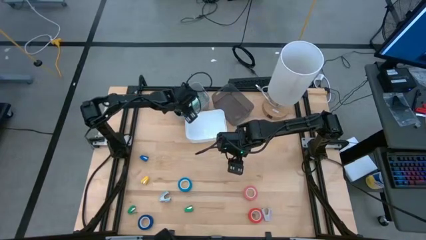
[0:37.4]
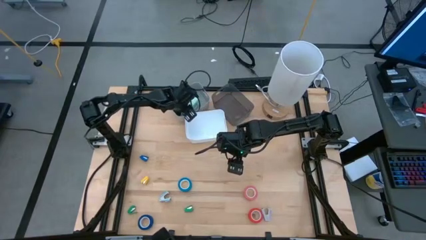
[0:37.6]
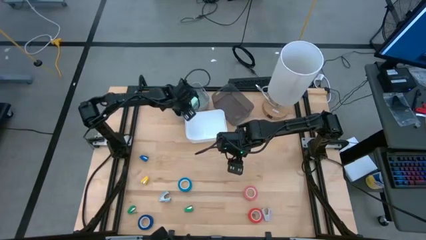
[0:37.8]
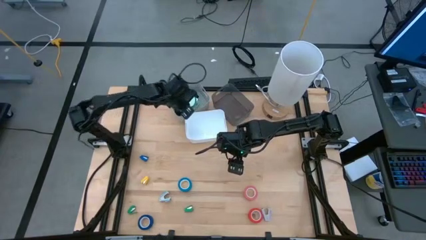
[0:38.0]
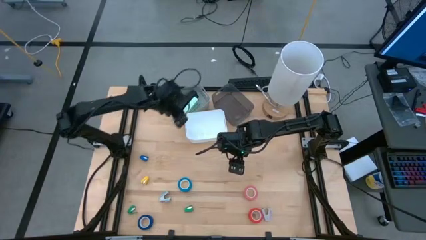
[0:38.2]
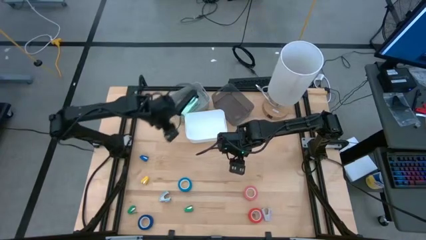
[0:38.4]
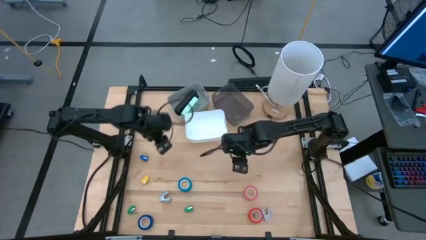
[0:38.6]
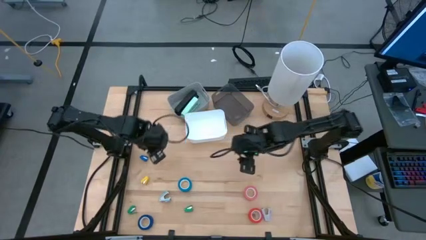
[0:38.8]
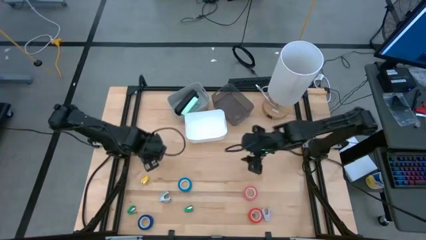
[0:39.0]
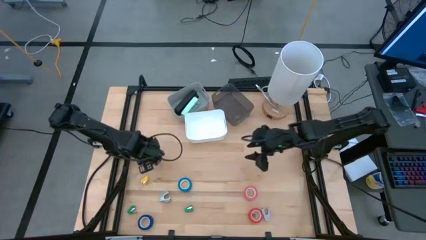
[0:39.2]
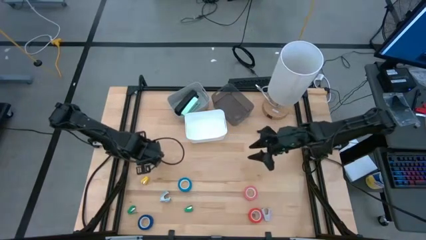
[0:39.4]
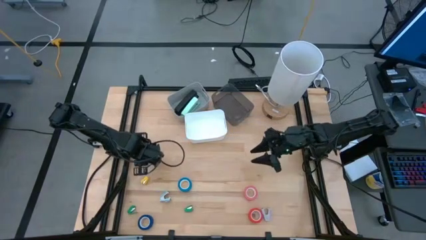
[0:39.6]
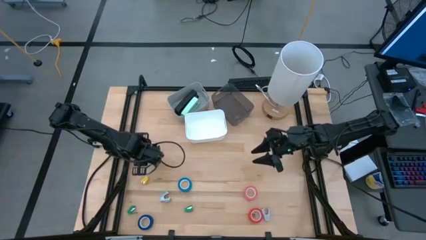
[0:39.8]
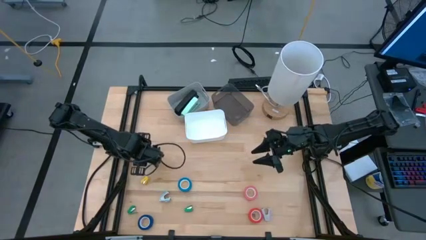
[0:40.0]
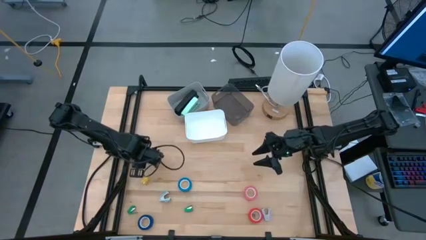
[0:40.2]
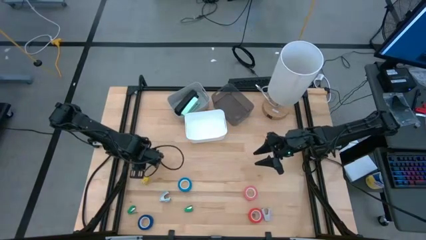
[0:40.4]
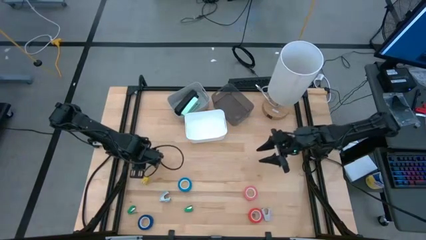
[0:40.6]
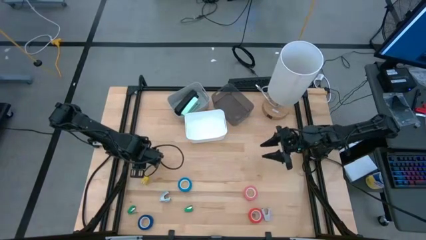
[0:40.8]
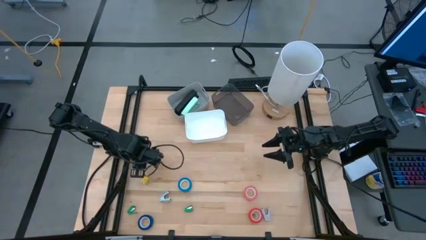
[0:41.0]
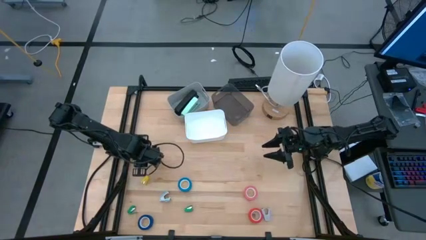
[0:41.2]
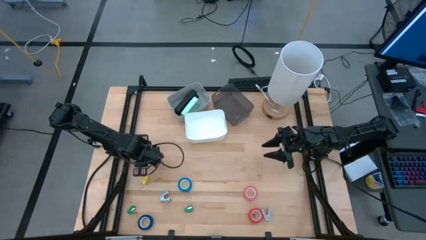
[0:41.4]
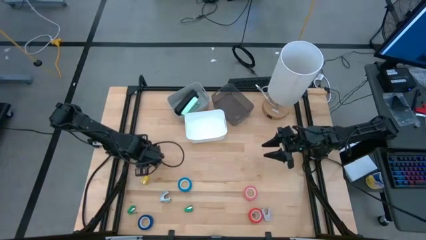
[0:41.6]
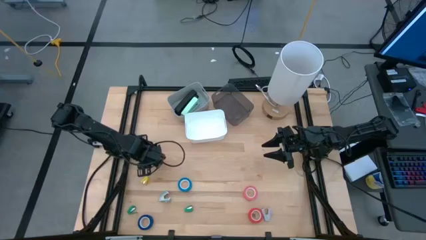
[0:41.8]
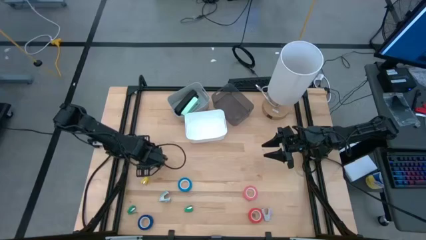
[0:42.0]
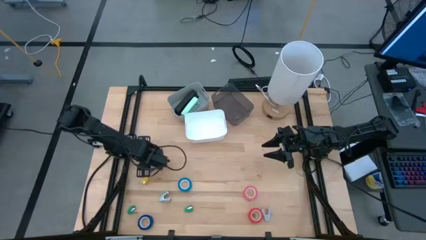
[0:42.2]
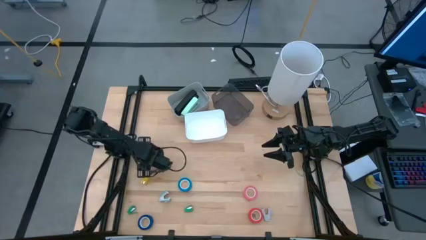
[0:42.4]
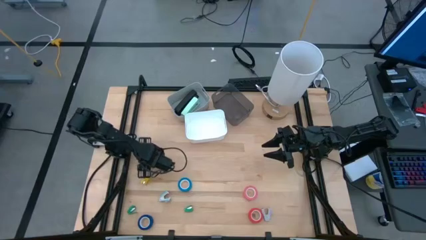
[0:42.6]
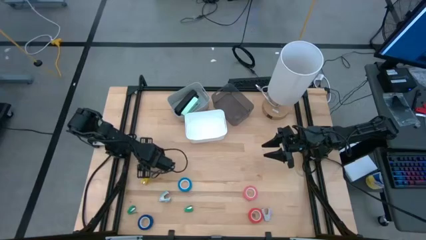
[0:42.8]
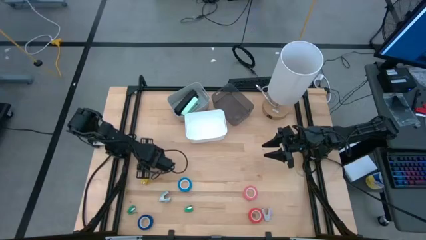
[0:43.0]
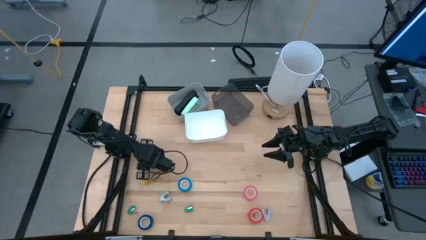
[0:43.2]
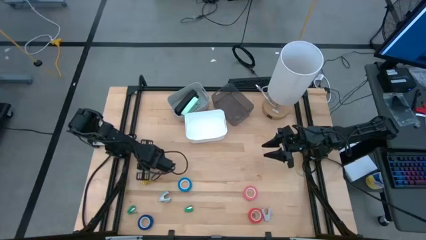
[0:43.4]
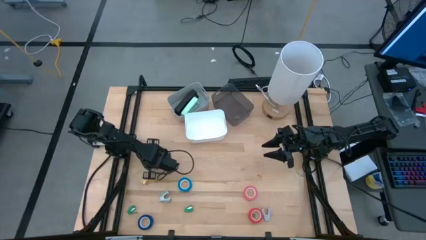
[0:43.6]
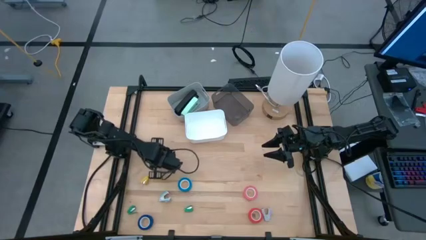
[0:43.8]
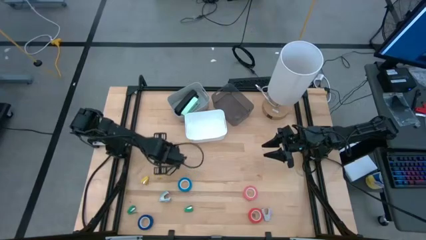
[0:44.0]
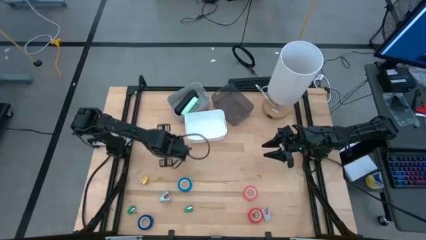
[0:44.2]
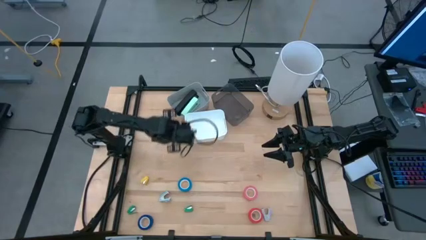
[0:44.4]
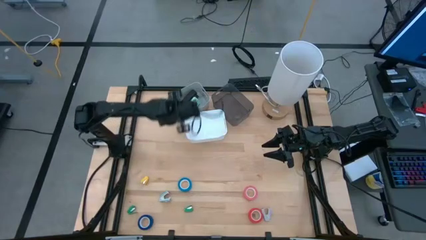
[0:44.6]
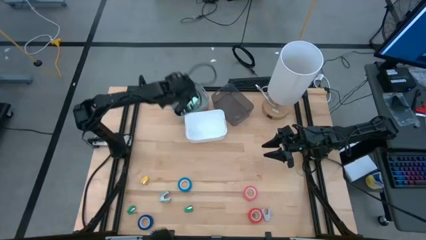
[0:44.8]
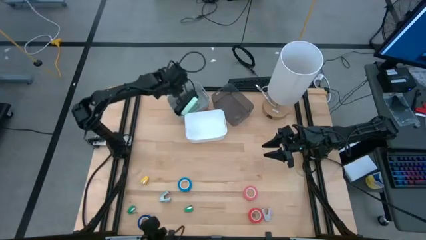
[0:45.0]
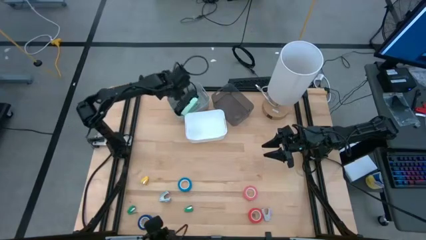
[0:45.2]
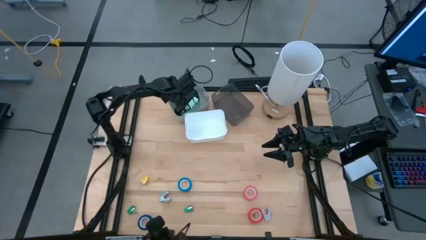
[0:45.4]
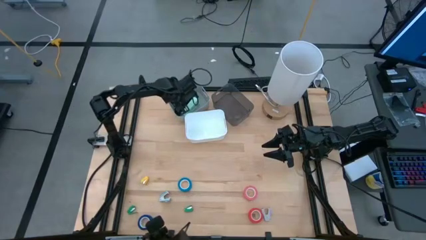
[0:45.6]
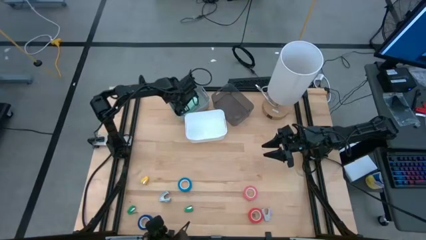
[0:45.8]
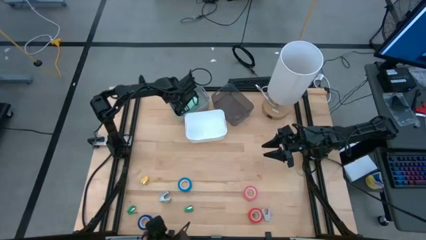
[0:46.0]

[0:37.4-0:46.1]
Task: Pick and place Stapler, Stapler remover, tape
Put the small blue stapler into the gray bin

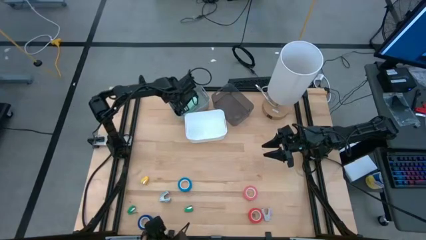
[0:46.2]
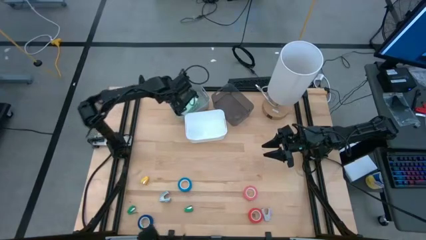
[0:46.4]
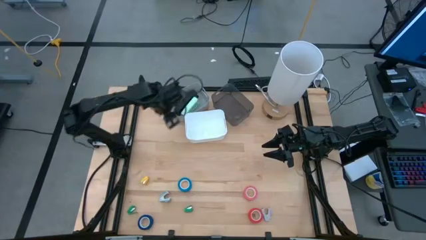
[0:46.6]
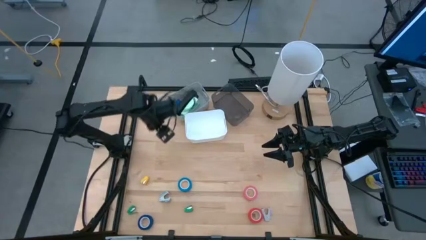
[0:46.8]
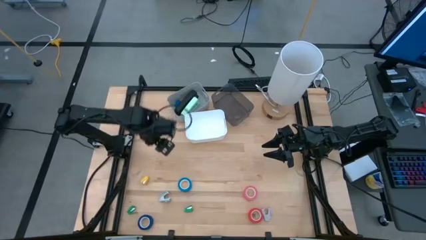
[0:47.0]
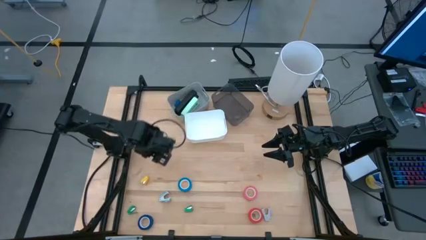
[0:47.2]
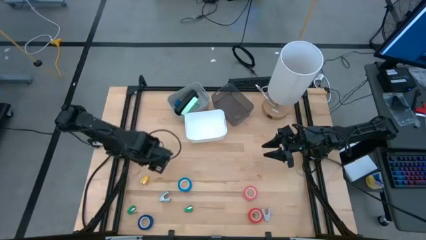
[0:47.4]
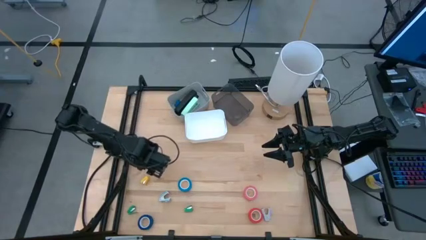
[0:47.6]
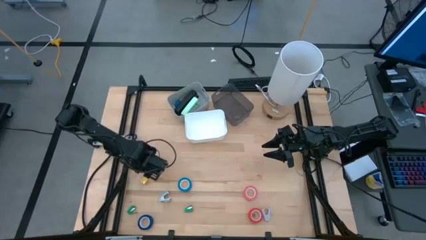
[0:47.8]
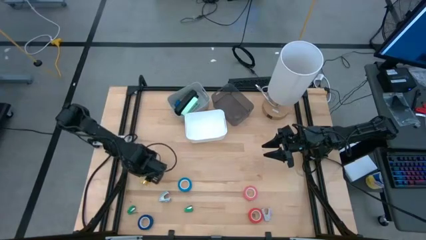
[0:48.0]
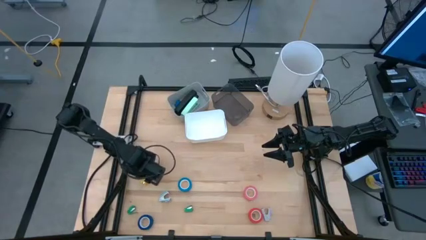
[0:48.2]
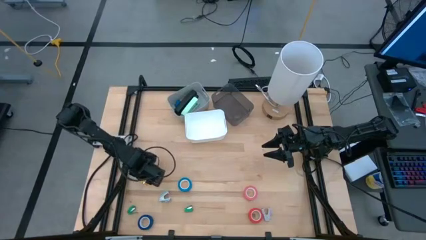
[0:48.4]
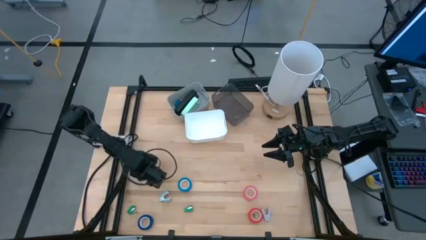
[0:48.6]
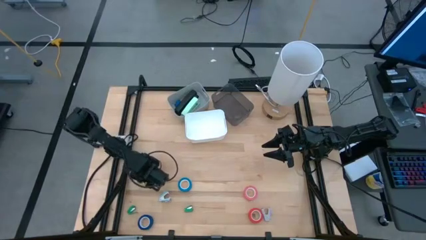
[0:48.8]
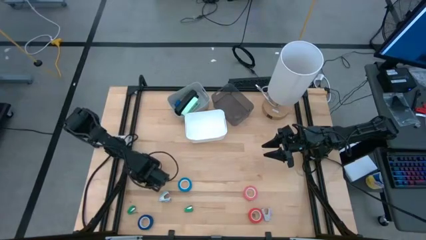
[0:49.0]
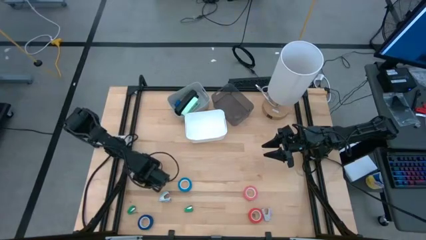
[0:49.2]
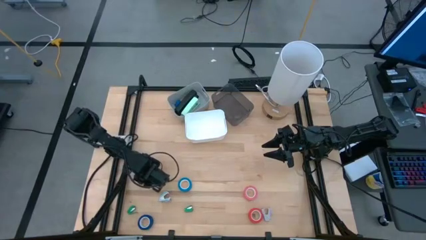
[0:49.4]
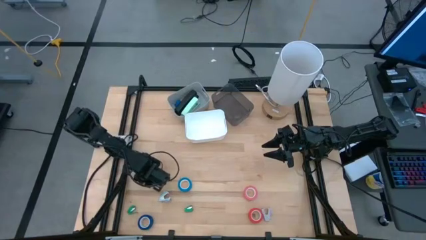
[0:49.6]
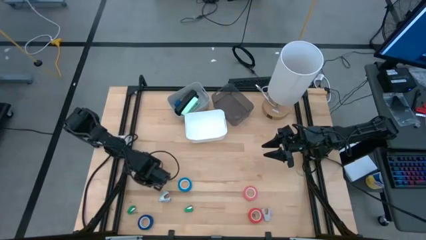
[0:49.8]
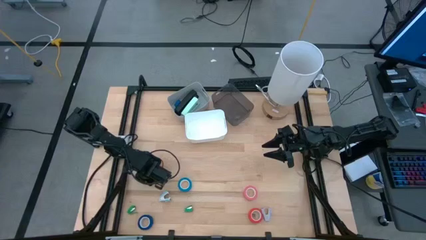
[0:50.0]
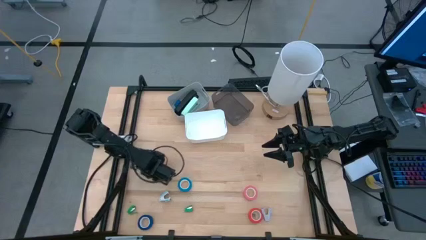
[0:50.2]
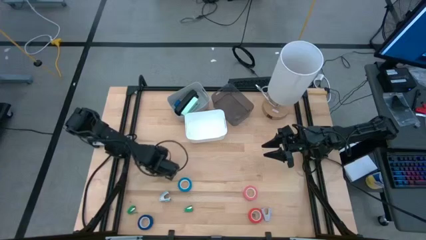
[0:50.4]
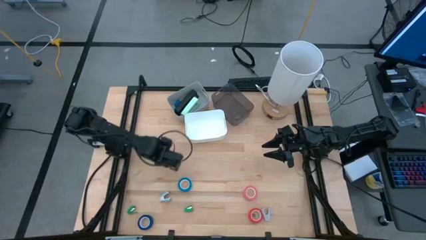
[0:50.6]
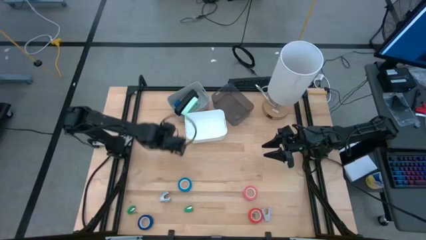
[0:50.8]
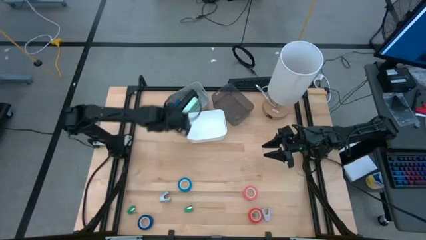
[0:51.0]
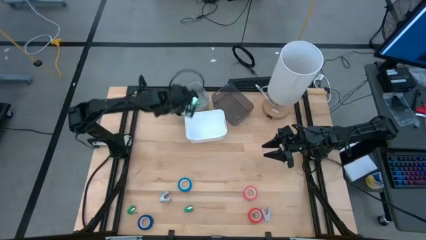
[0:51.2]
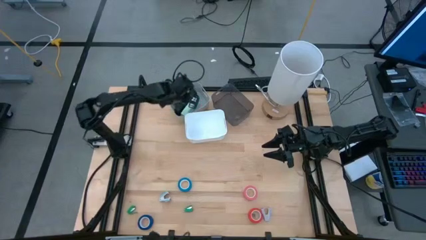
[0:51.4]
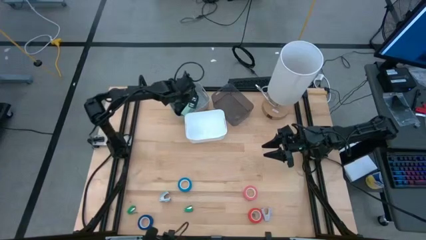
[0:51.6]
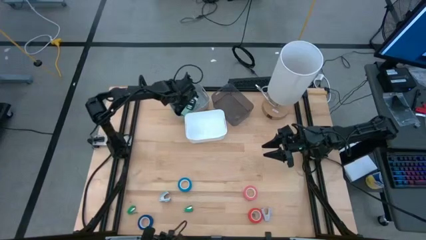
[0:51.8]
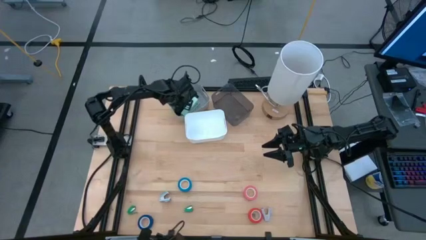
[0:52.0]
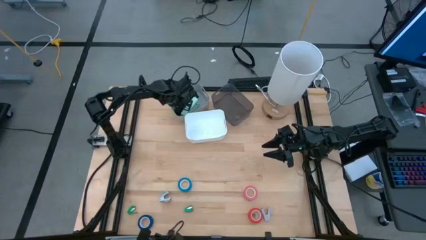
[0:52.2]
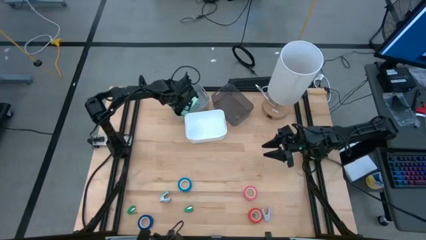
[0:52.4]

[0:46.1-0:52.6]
Put the small yellow stapler into the gray bin

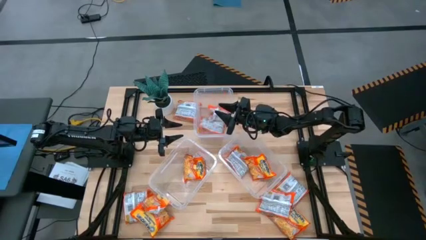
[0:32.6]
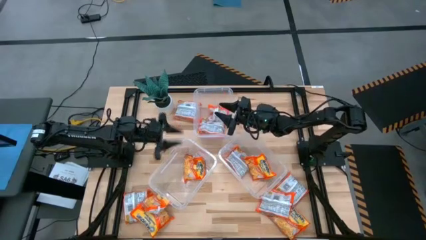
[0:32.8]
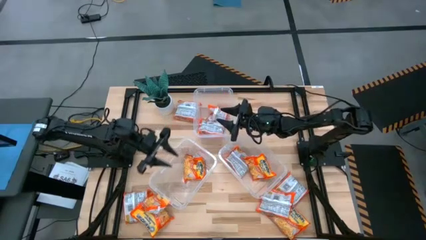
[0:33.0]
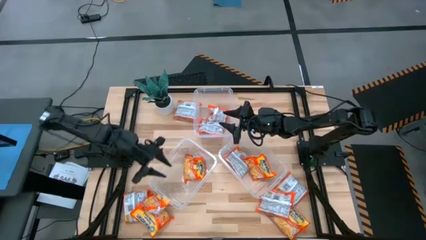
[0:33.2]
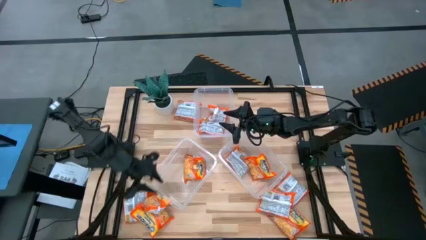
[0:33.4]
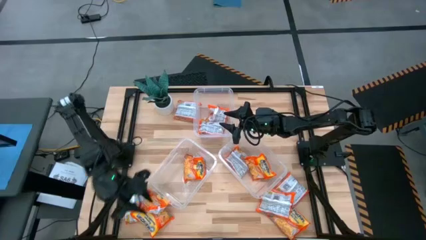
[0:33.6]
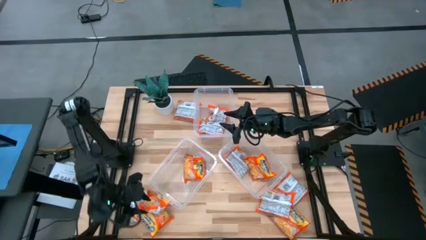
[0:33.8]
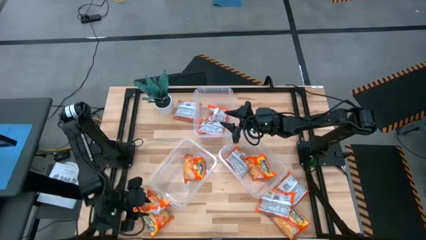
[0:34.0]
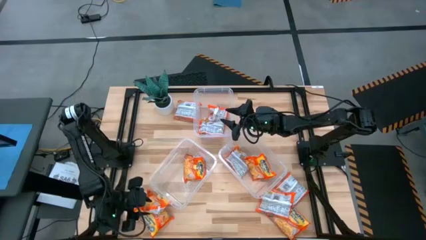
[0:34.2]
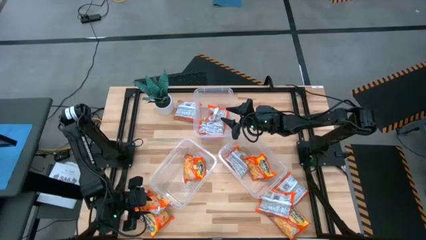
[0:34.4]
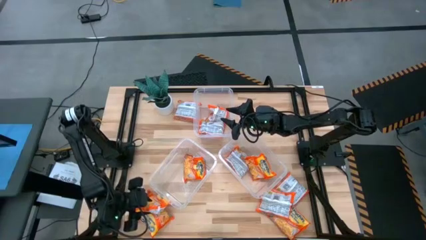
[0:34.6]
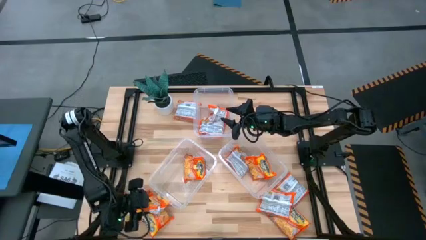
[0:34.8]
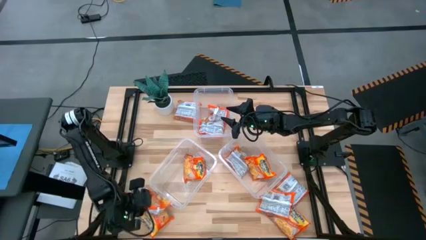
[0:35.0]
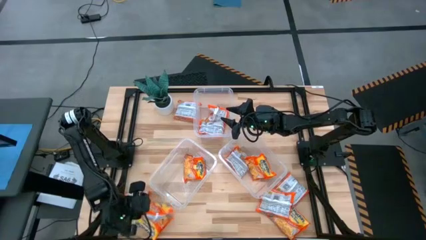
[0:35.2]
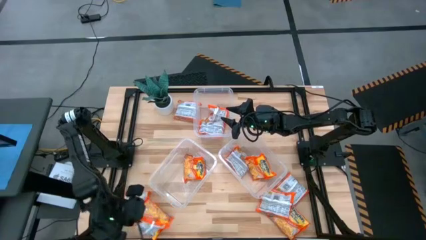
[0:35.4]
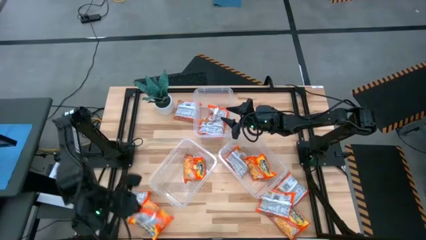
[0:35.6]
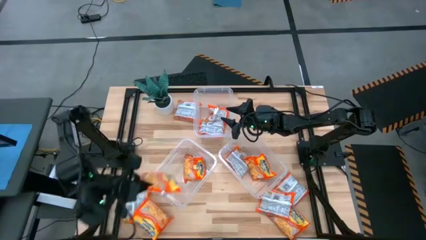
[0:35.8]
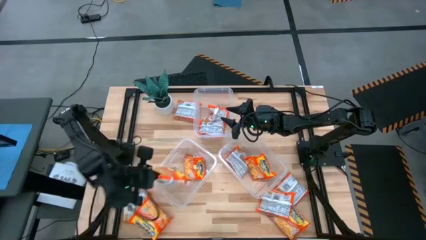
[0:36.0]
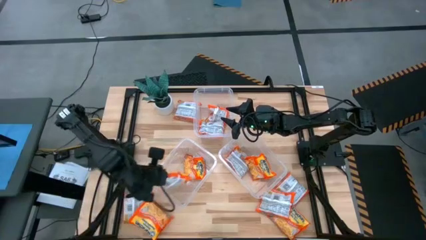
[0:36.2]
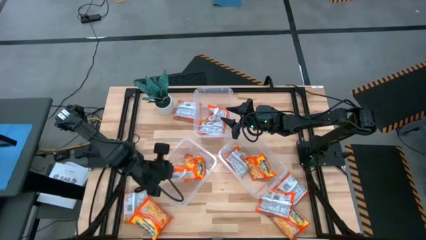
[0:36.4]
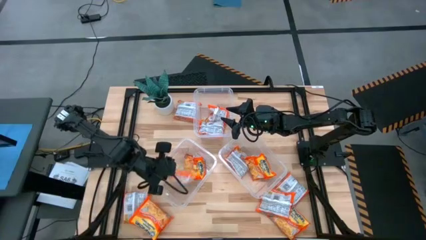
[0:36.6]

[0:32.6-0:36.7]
Task: Sort Maruchan noodles
Put the noodle pack into the bottom left transparent bin
